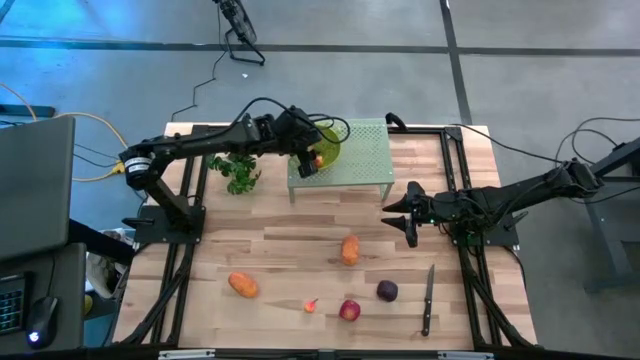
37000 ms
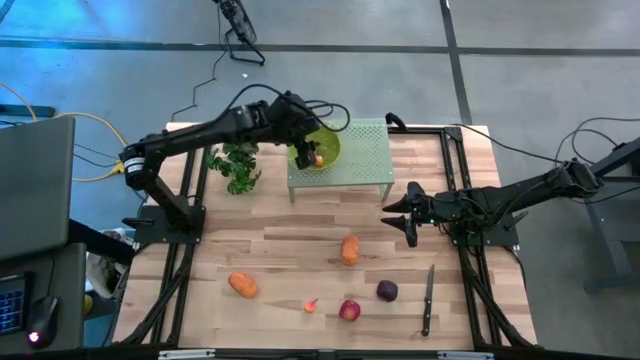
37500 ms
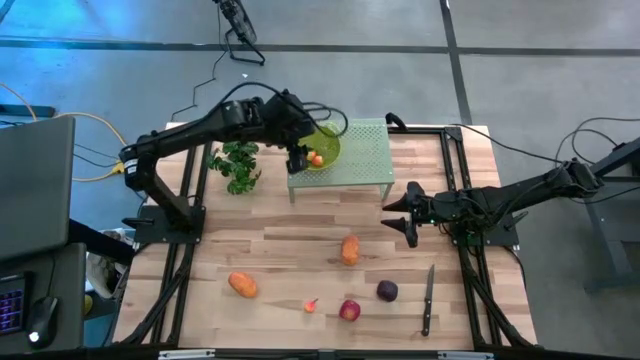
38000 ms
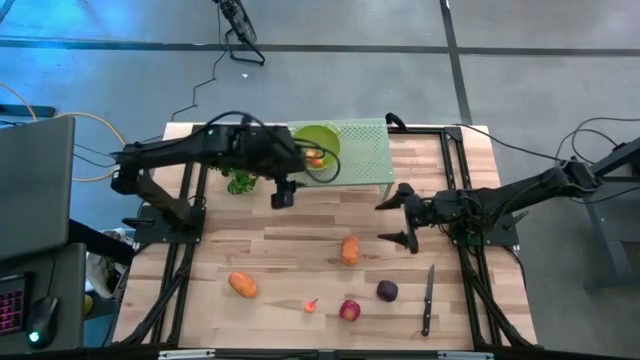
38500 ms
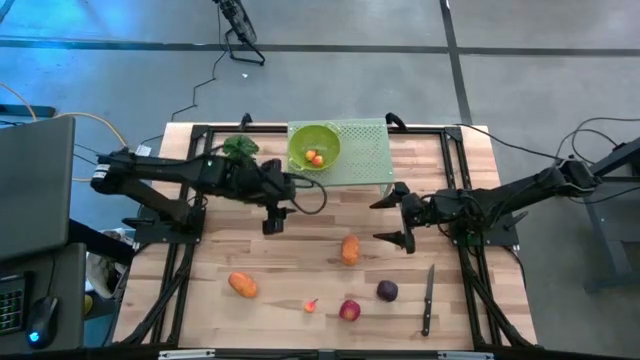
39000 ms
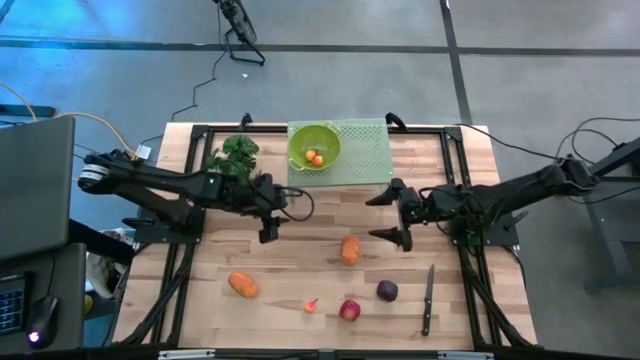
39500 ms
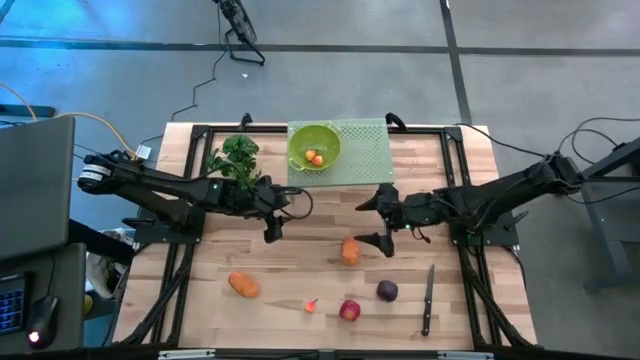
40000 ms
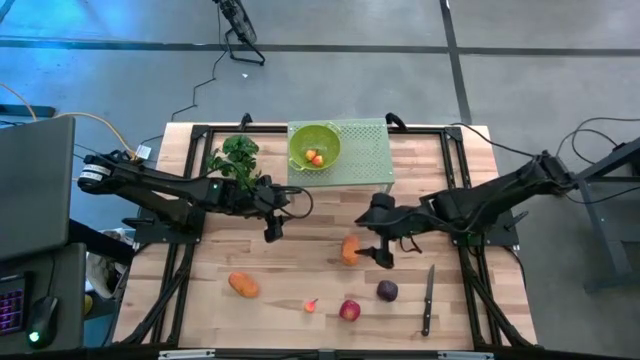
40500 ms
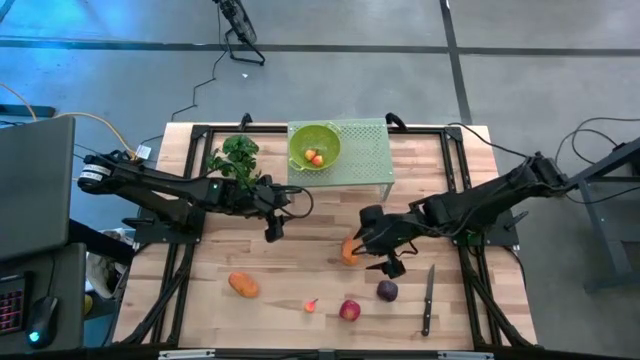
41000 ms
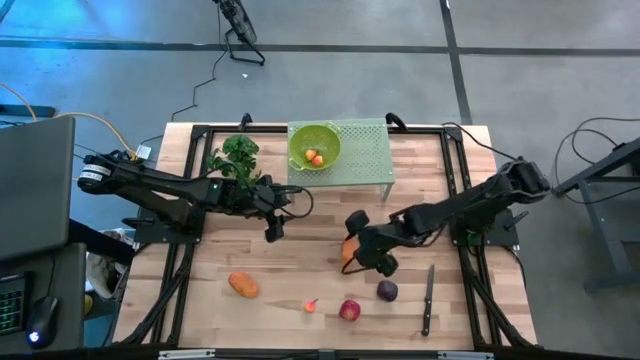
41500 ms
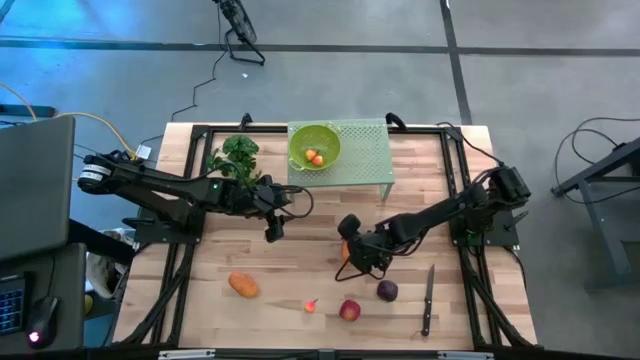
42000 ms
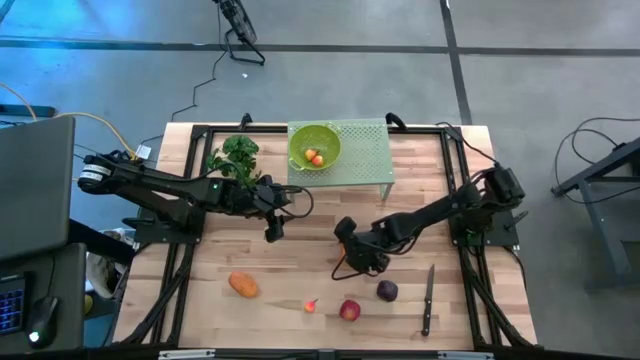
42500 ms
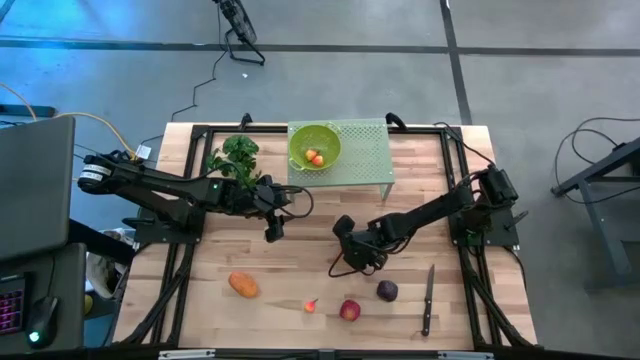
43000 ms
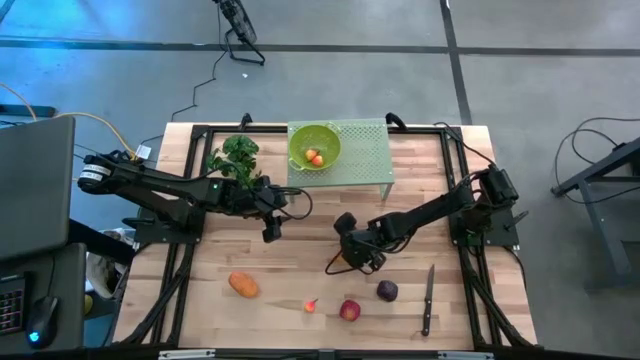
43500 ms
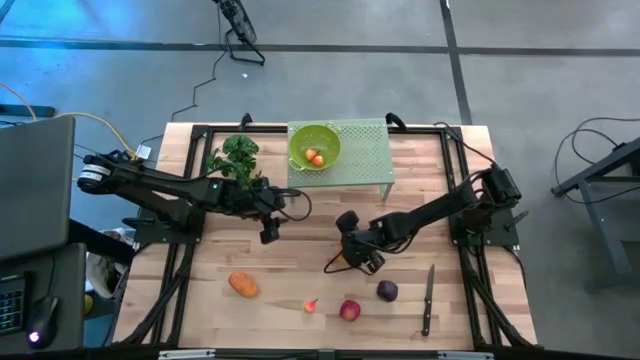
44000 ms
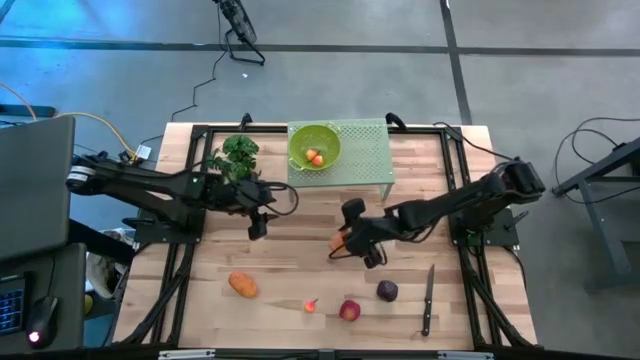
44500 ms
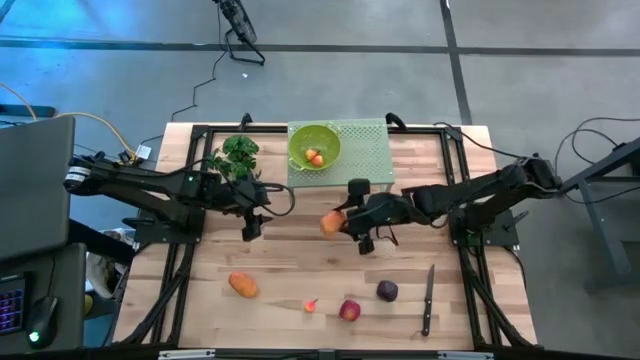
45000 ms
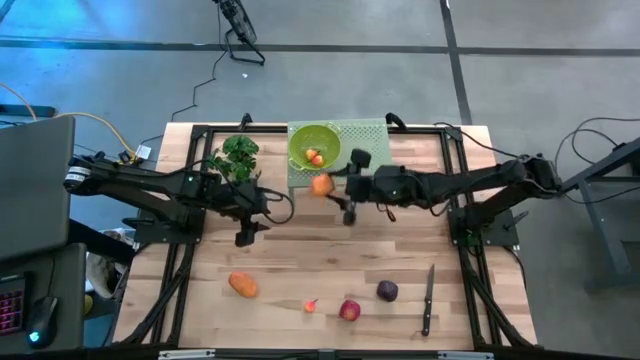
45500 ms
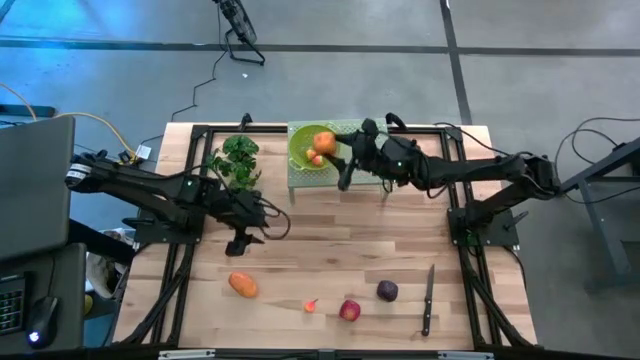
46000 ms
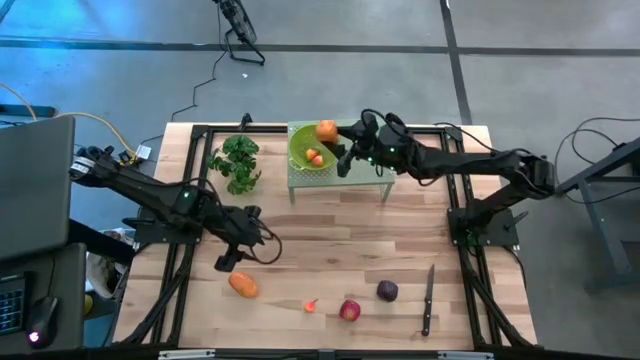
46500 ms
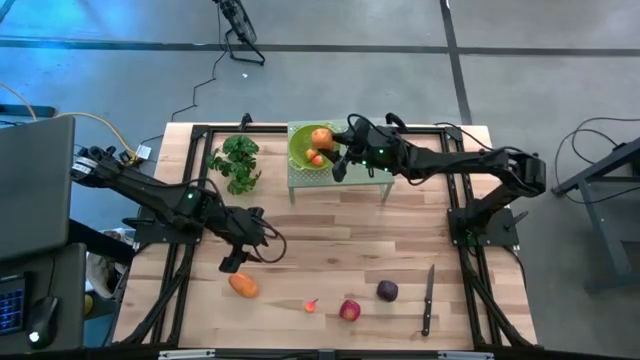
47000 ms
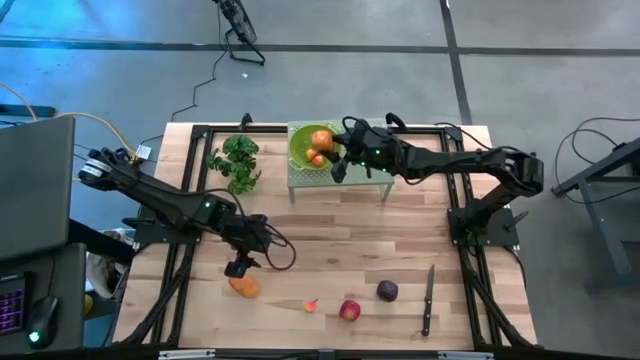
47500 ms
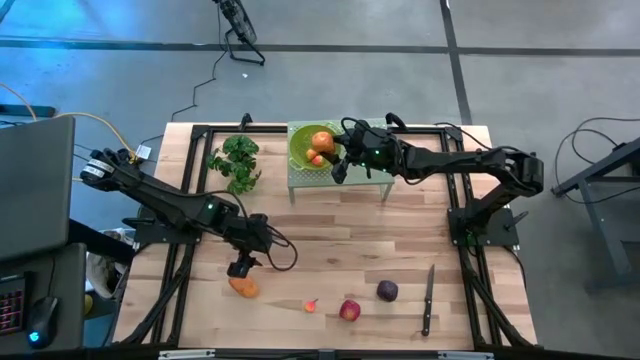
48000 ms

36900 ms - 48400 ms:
Task: Pick & Place Fruit
Put the right yellow mango into the green strainer bowl on the shelf

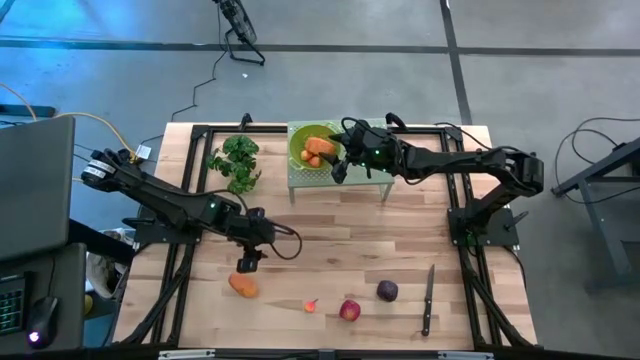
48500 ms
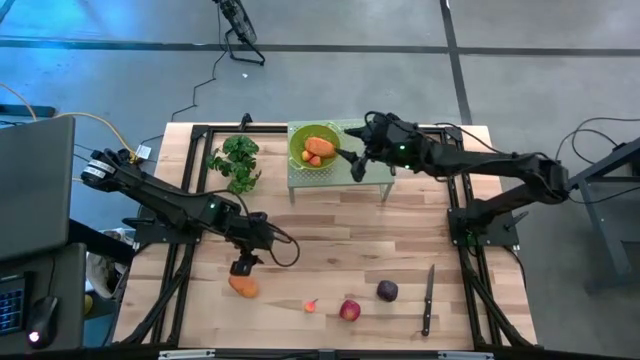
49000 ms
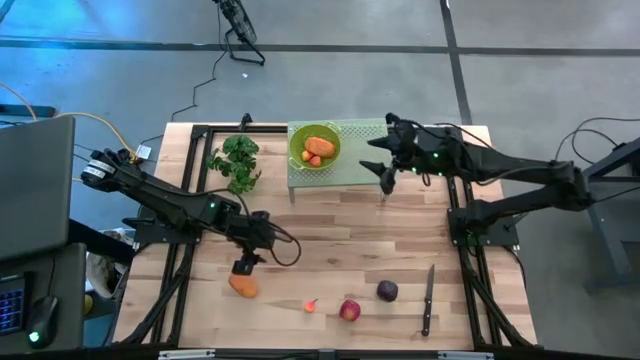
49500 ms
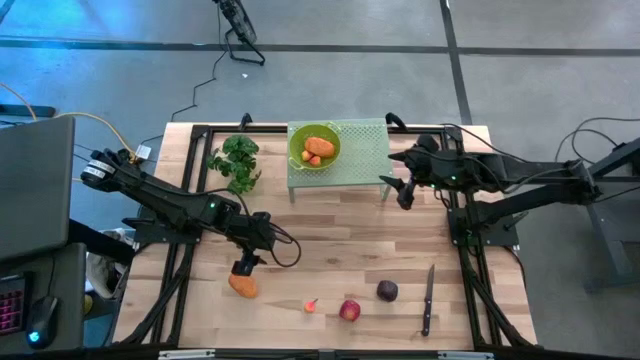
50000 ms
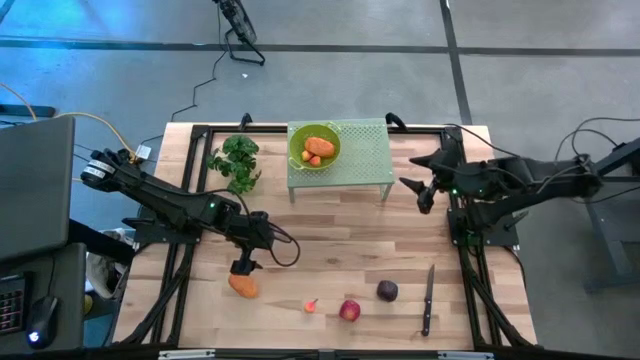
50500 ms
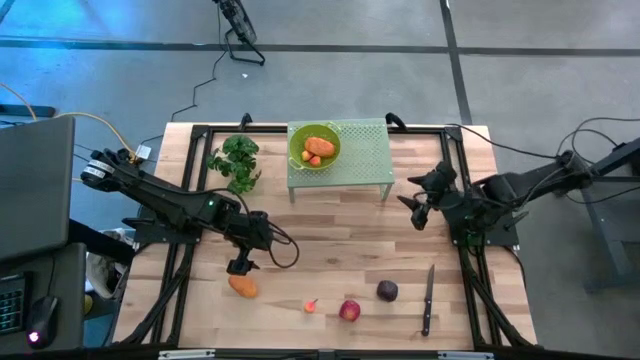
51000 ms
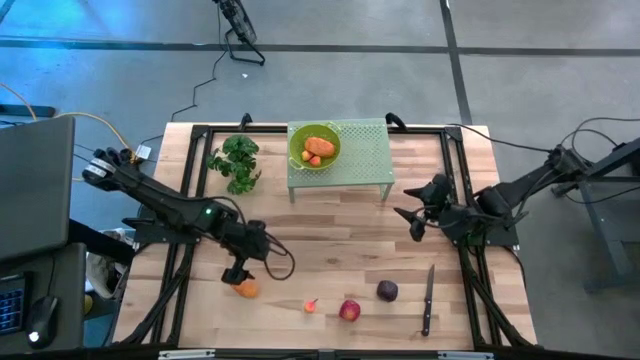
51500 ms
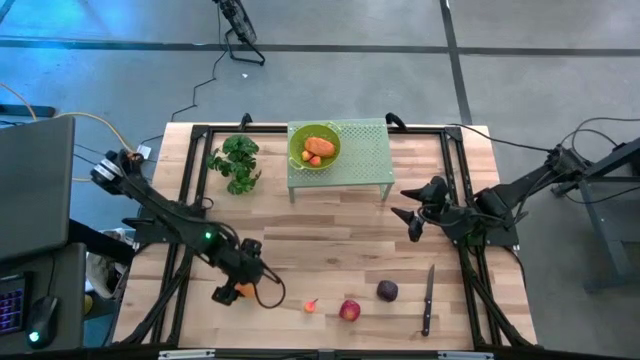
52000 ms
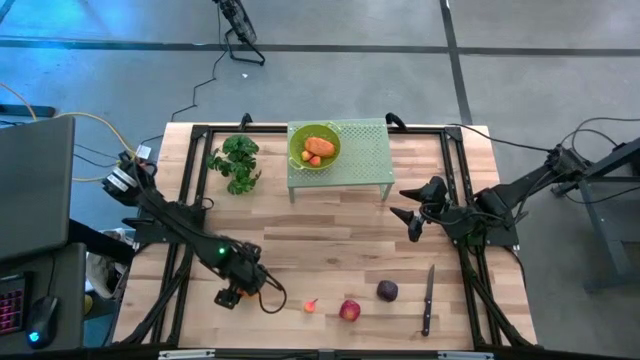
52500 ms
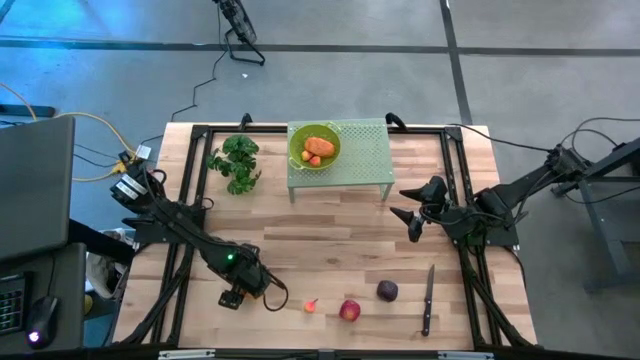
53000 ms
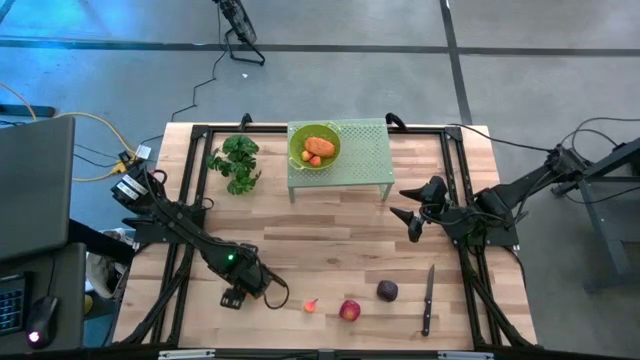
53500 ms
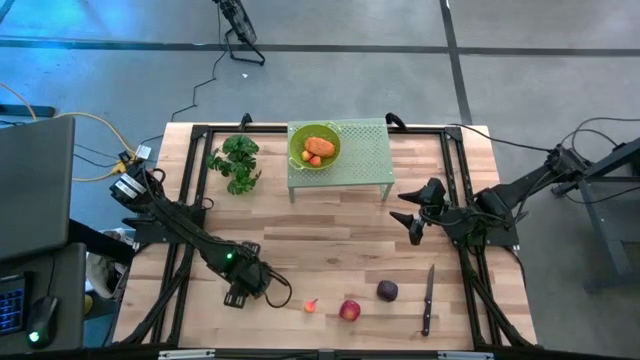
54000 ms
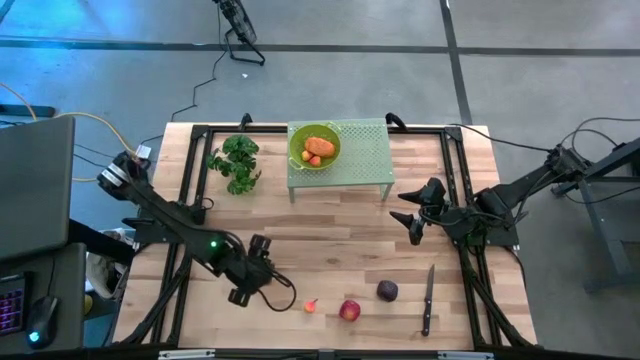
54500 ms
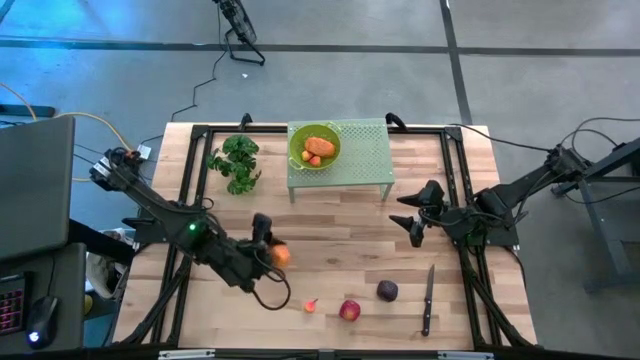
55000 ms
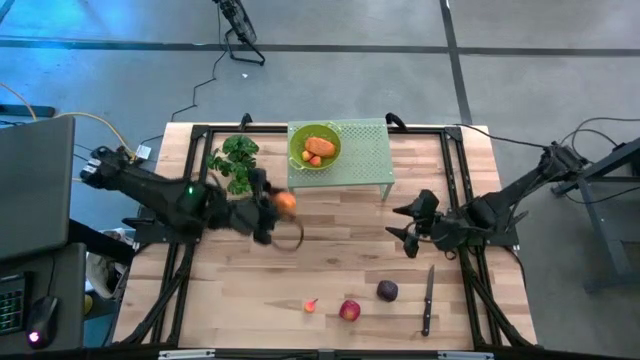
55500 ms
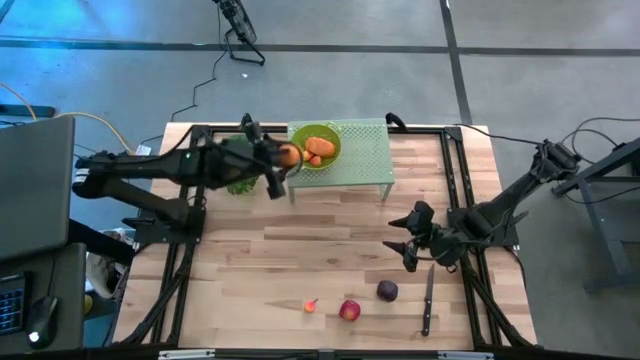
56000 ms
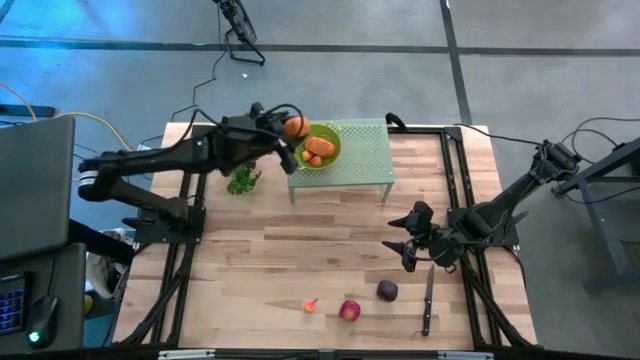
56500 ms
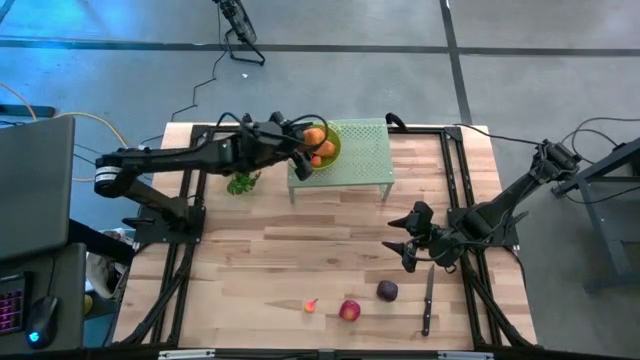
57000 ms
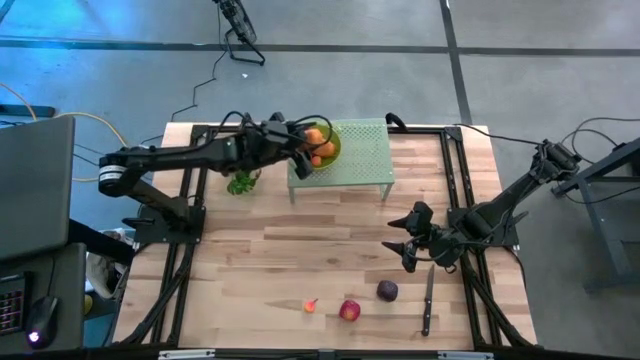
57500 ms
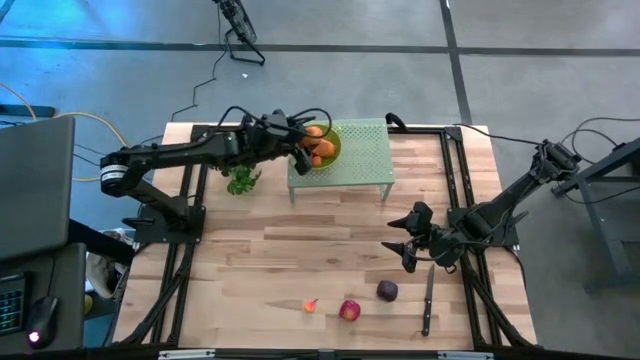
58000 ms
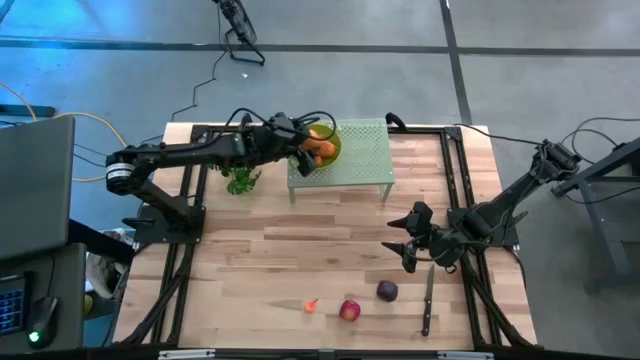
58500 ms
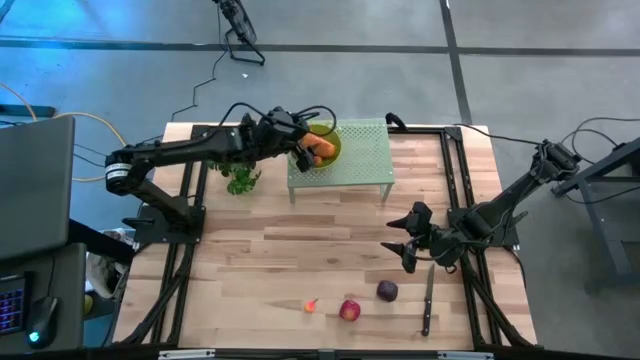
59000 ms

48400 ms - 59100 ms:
Put the yellow mango into the green strainer bowl on the shelf
